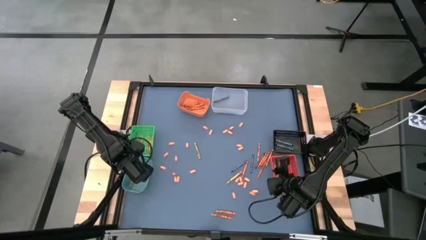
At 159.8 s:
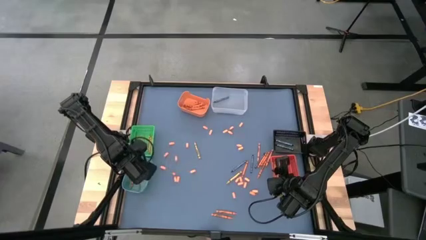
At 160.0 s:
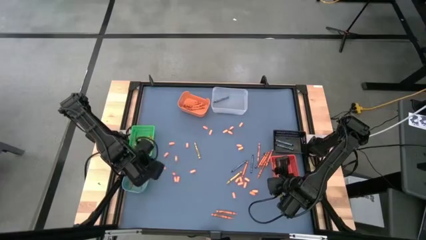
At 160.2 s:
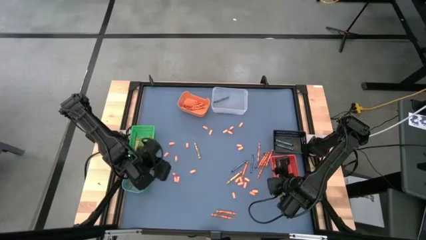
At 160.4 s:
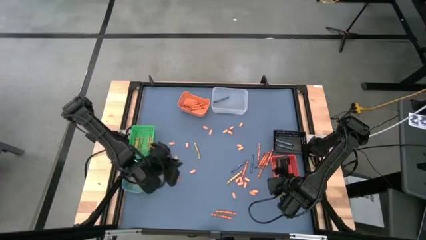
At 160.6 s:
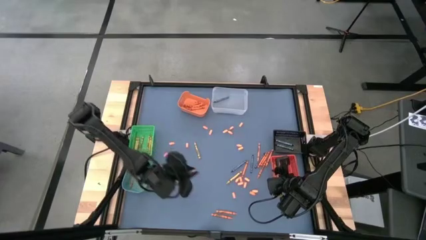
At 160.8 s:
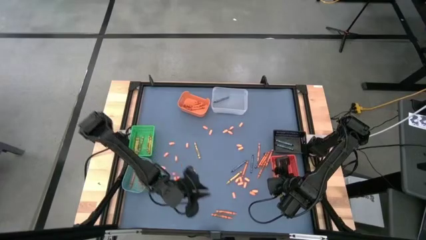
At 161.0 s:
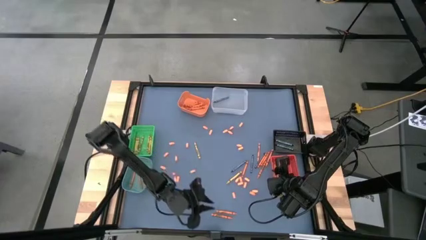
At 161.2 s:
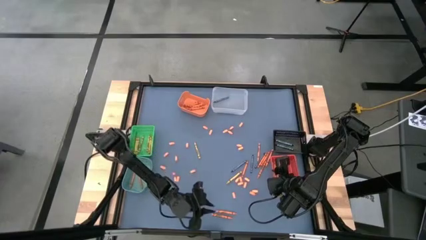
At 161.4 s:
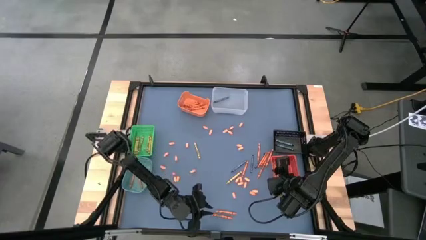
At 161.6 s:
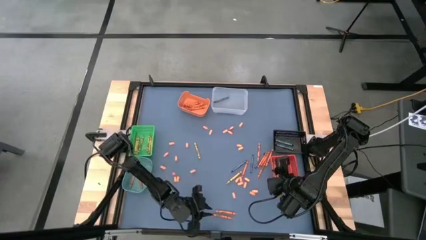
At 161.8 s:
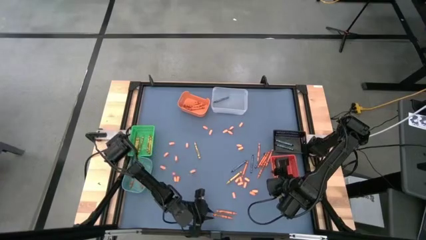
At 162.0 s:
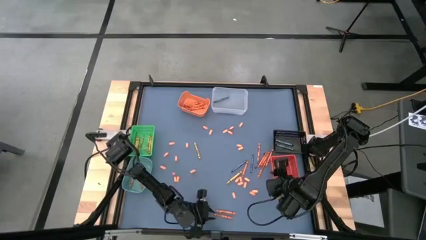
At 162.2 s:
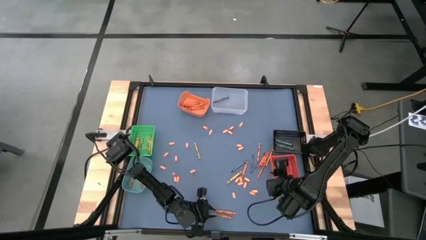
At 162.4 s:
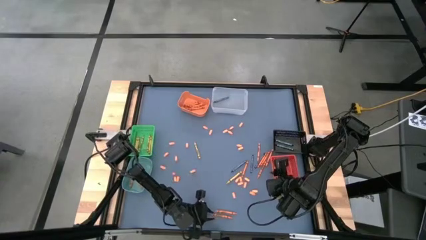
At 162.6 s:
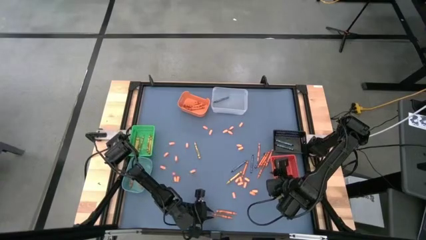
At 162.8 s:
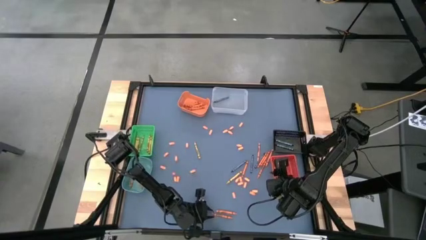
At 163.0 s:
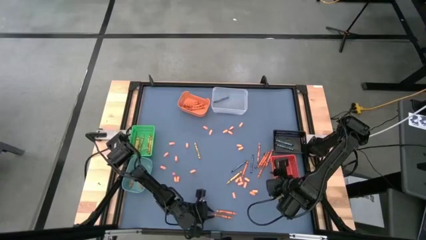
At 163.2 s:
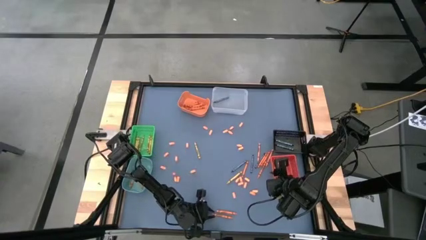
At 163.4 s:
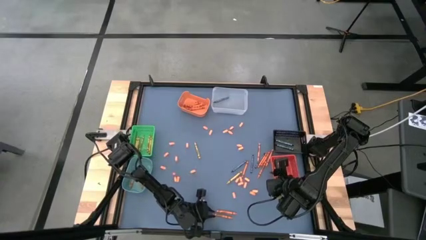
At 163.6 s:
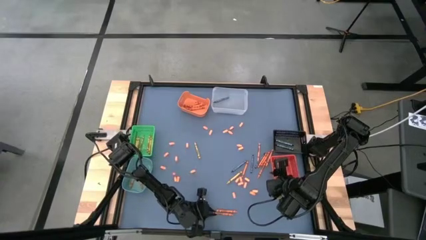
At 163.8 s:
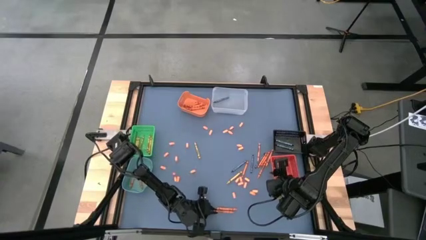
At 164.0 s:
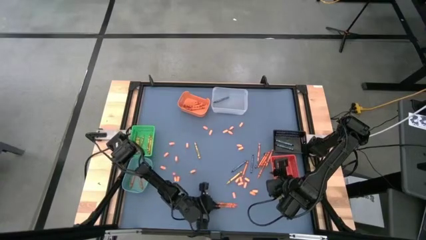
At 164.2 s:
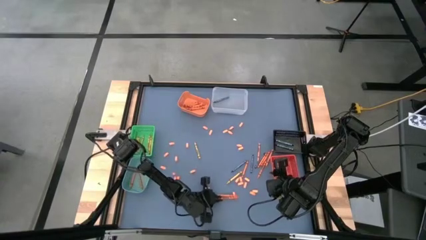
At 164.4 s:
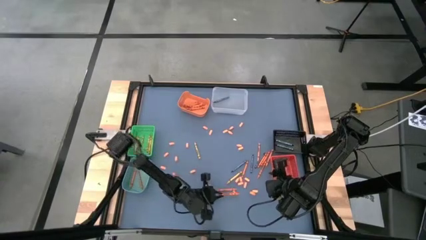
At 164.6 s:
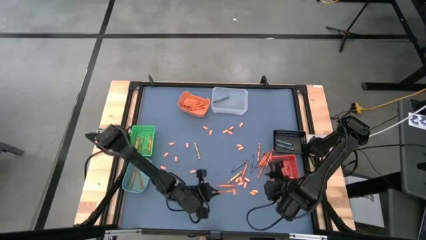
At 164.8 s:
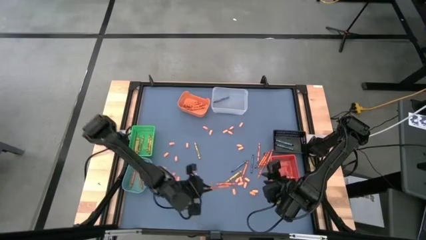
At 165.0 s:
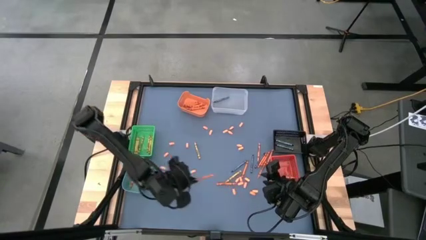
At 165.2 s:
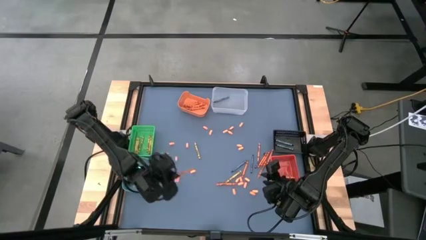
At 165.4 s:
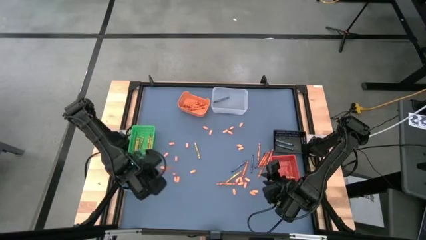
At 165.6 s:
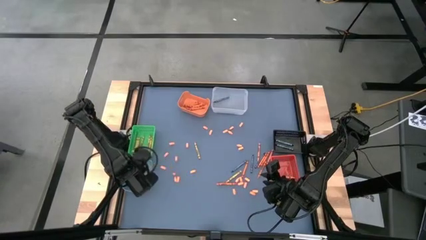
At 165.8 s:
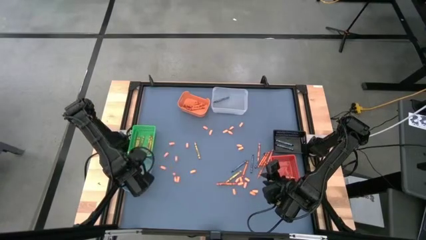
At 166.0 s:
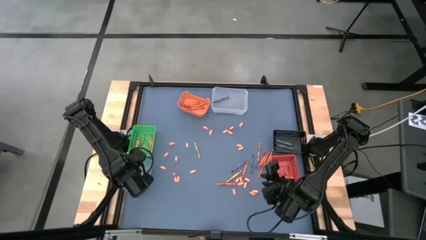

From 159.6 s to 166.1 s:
Task: Sort crayons
Put the orange crayon into the blue bin

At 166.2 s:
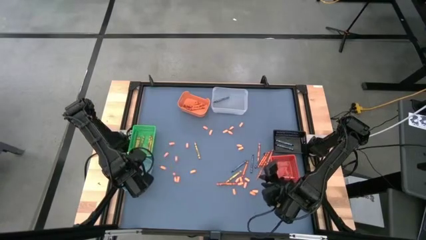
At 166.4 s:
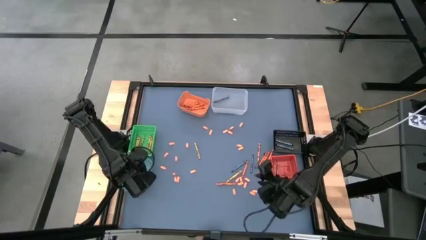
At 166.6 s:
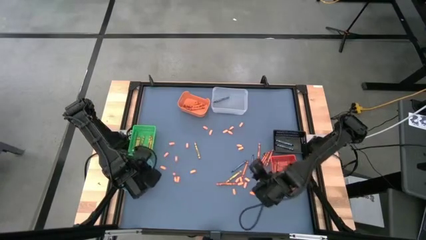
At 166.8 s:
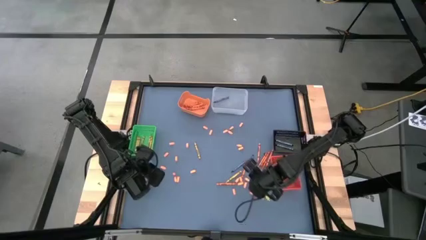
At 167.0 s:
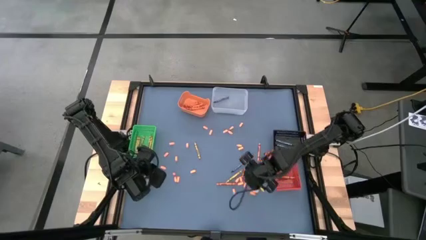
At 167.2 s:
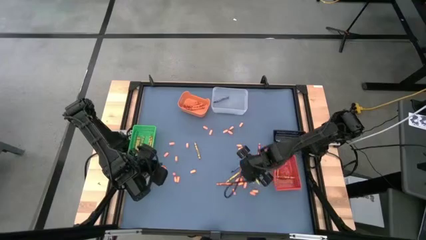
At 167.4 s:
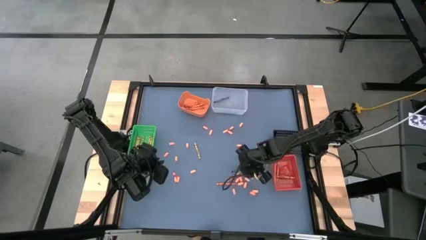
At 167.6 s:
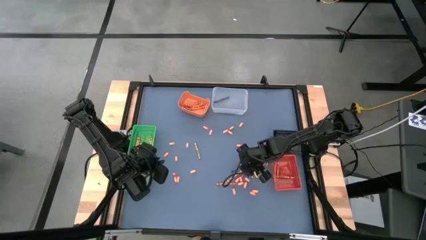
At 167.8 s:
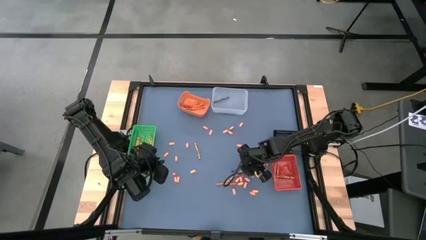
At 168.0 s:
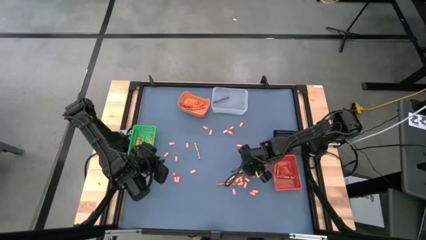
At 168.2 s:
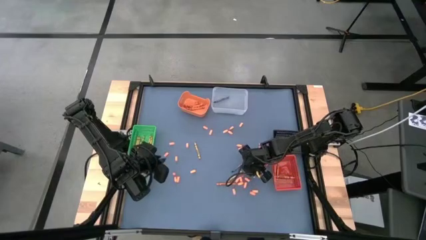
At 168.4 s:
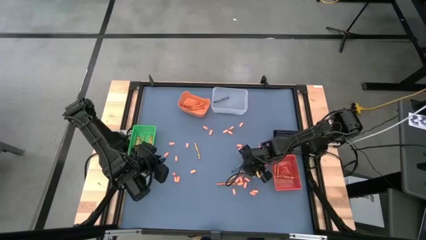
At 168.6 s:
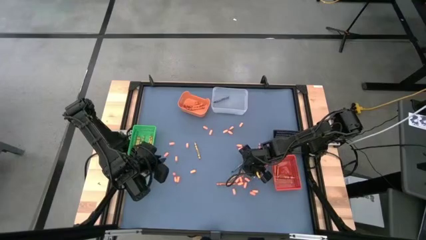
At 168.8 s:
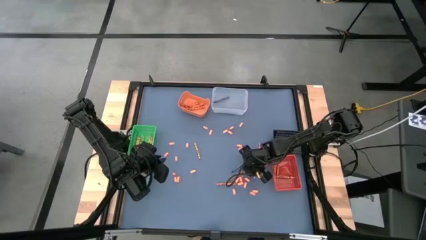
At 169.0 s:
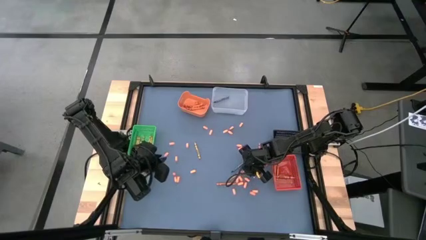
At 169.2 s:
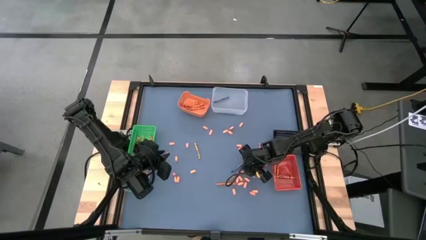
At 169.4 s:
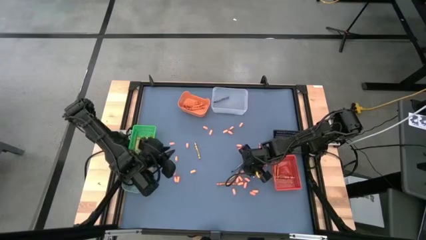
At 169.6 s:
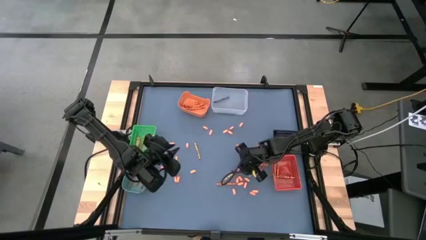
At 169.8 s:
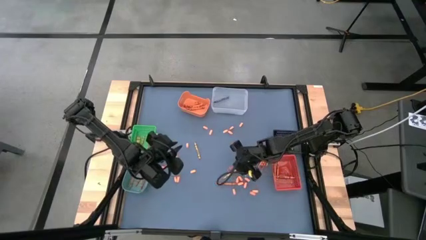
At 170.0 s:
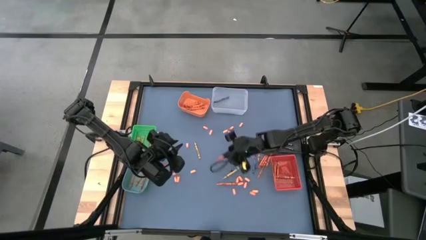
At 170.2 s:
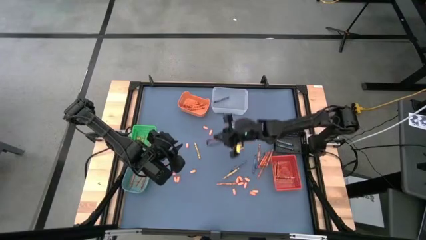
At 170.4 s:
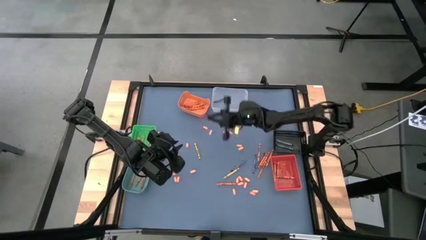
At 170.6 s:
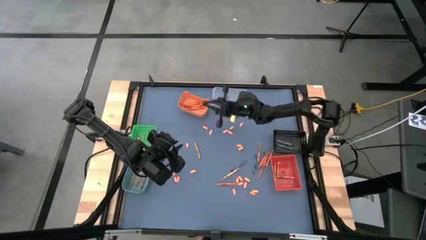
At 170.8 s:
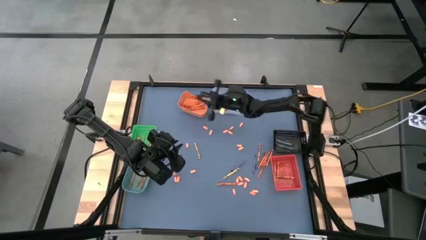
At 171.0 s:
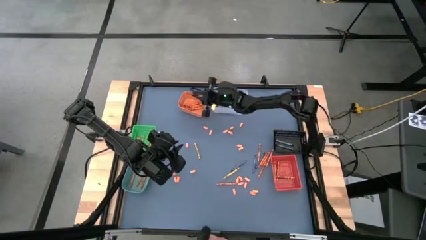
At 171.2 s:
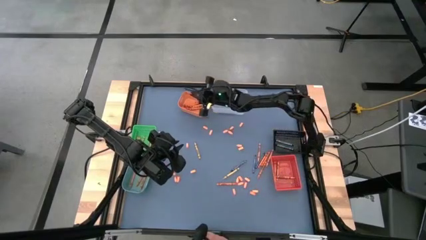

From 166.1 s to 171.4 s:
Put the red crayon into the orange bin

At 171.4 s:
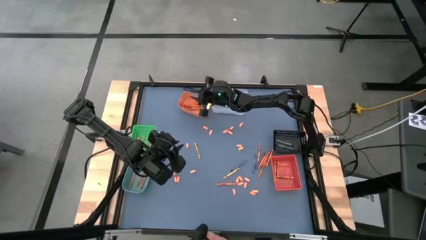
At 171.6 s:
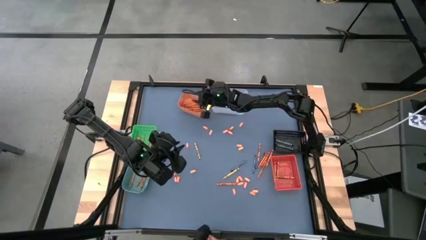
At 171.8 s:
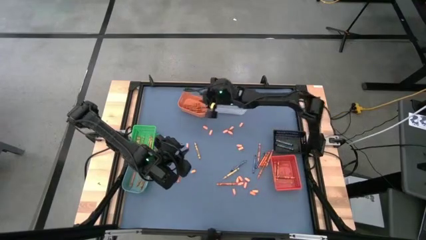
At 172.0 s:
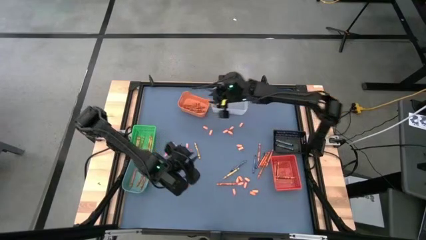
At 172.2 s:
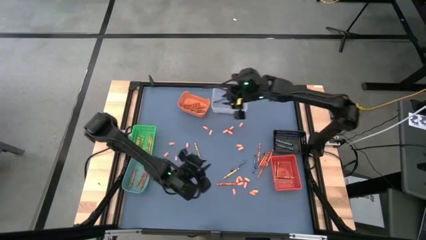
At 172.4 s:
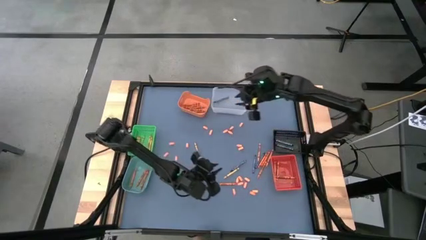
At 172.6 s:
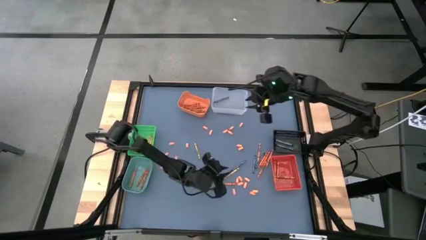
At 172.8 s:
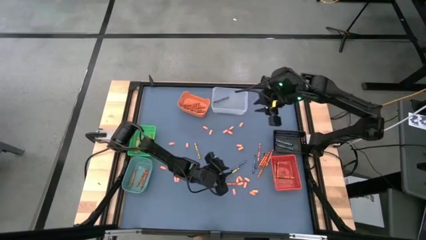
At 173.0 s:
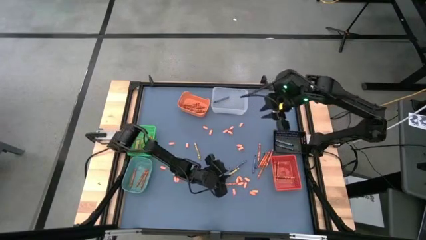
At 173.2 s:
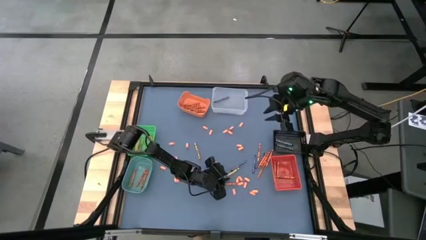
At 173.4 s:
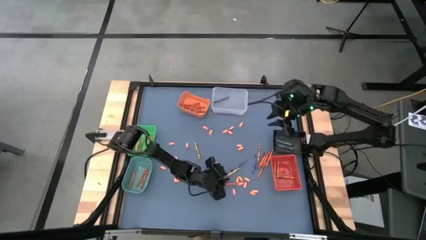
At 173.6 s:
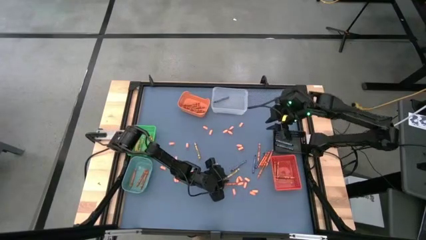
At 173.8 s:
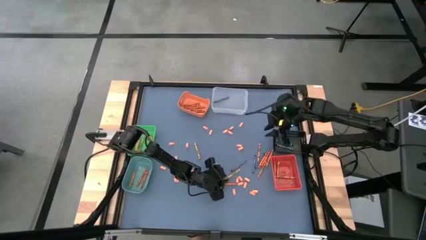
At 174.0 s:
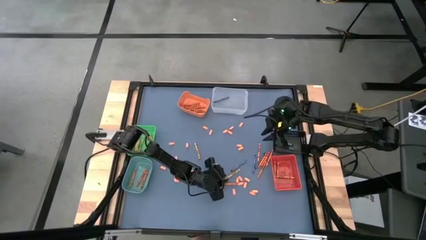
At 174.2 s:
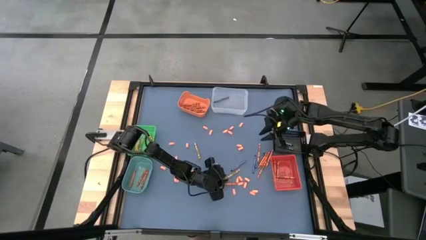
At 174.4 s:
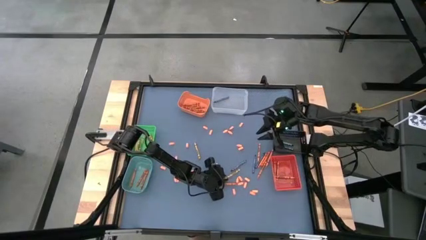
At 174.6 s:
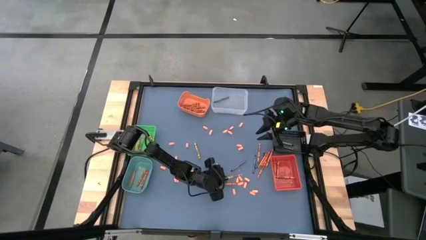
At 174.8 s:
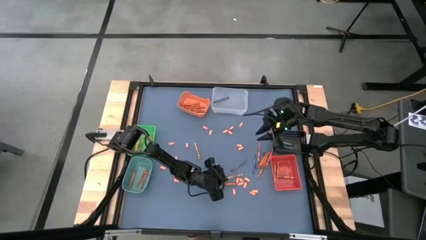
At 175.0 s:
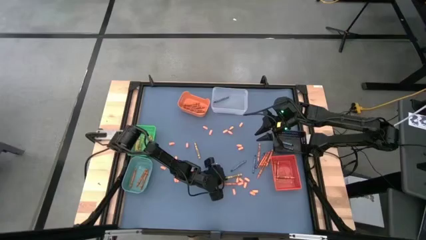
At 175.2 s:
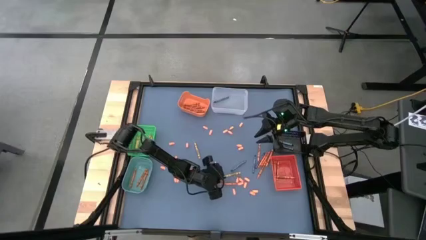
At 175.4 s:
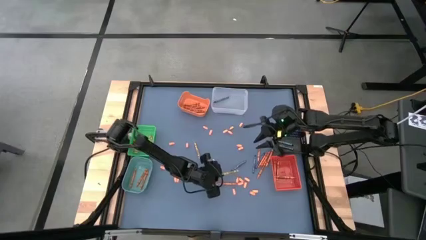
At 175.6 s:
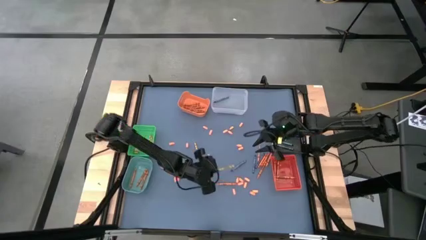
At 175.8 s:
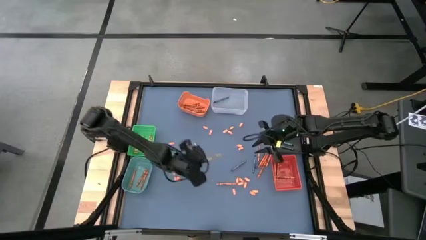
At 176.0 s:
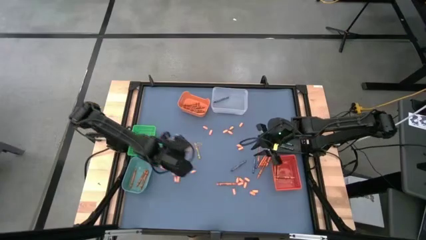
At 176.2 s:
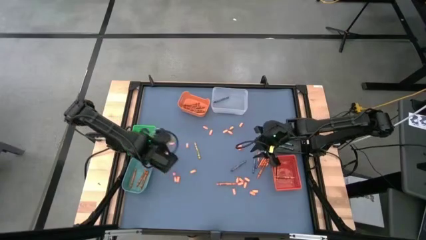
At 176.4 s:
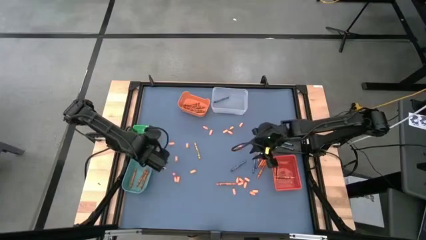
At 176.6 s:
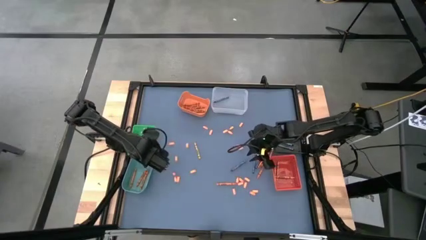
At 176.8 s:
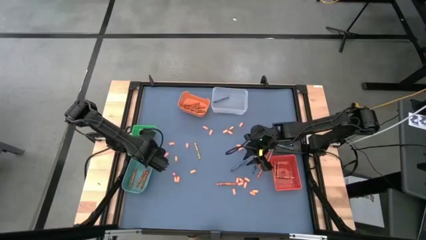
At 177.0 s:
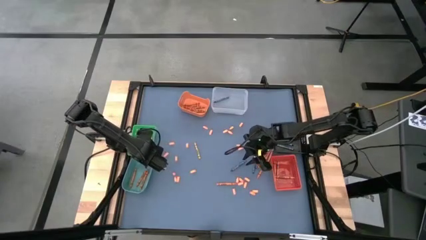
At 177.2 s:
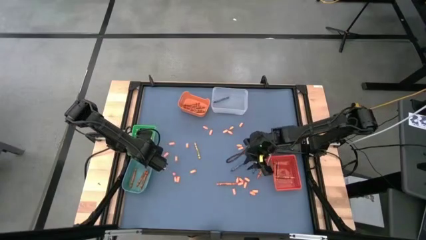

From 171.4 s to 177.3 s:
Put the yellow crayon into the green bin
